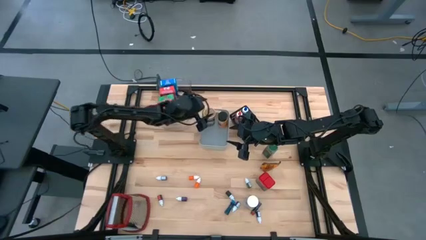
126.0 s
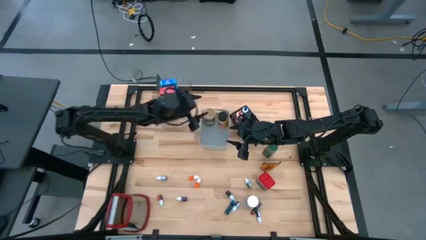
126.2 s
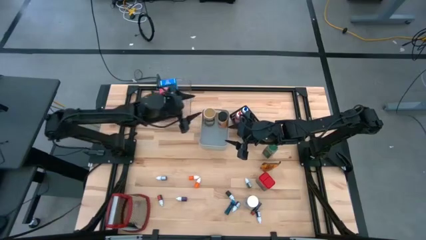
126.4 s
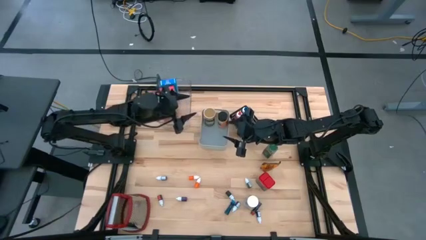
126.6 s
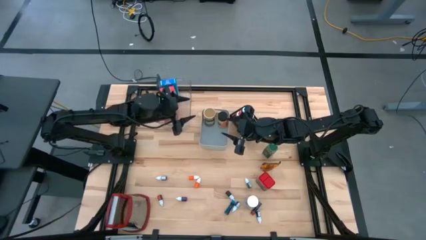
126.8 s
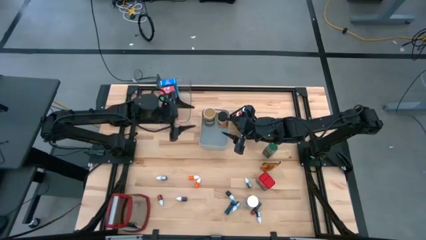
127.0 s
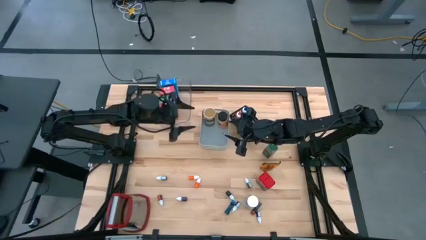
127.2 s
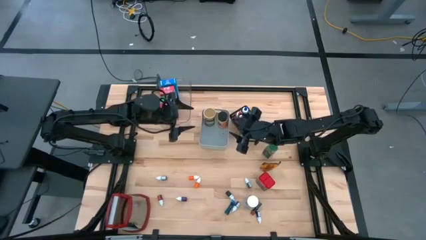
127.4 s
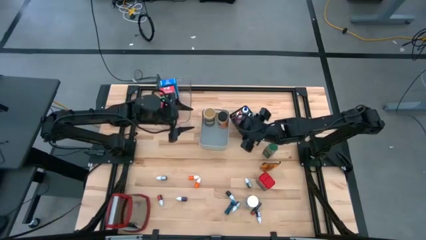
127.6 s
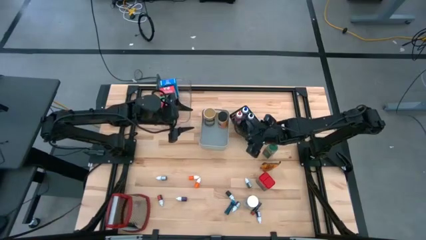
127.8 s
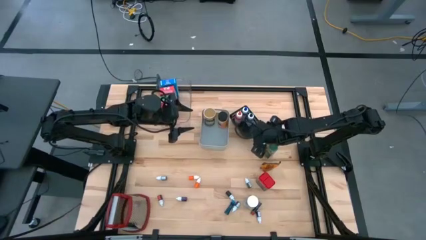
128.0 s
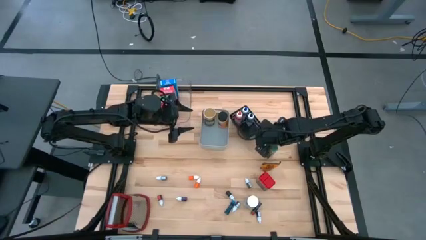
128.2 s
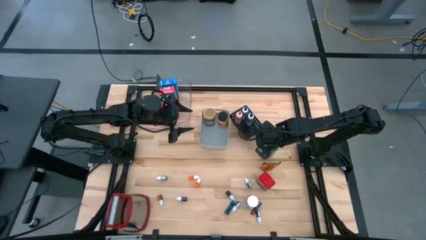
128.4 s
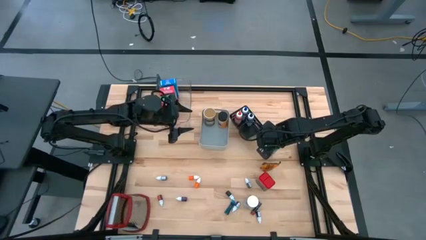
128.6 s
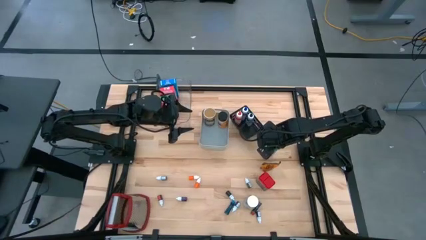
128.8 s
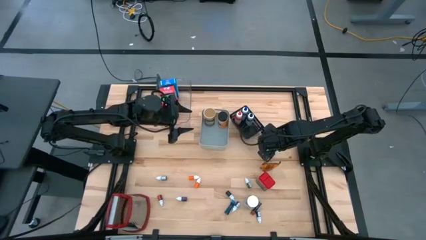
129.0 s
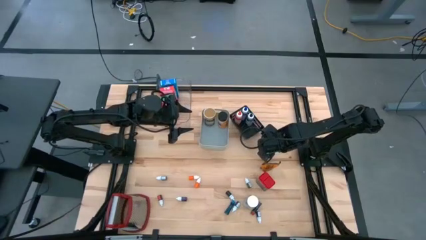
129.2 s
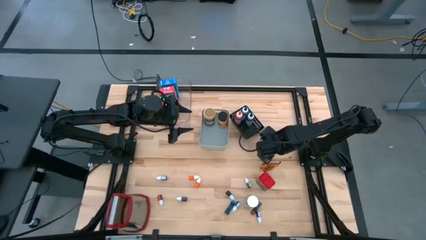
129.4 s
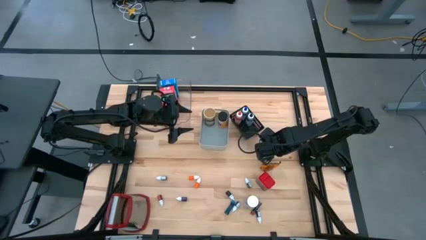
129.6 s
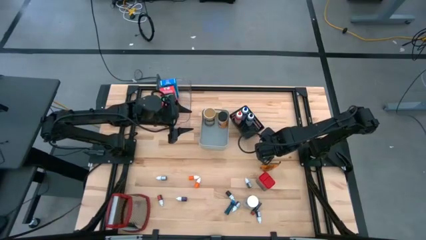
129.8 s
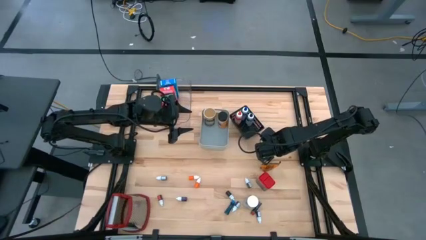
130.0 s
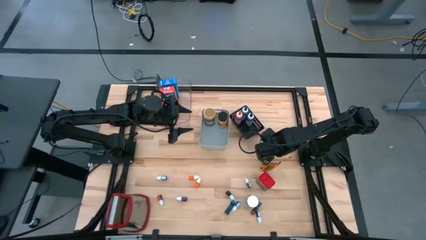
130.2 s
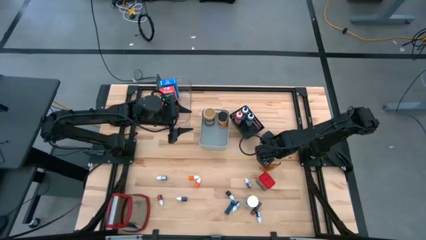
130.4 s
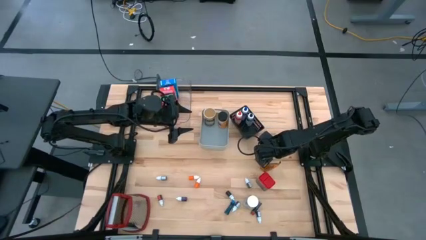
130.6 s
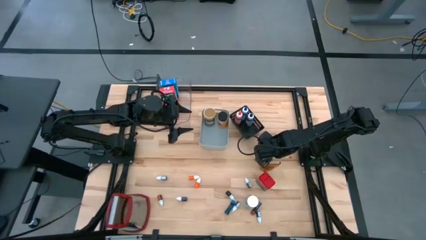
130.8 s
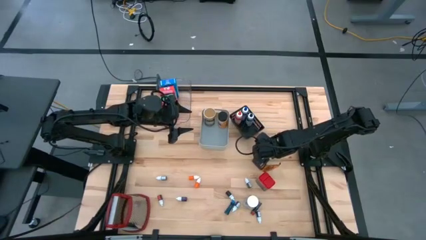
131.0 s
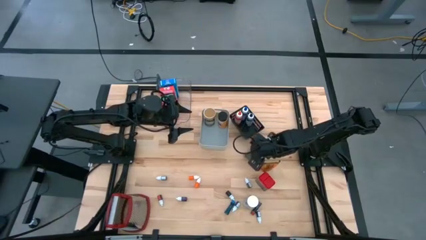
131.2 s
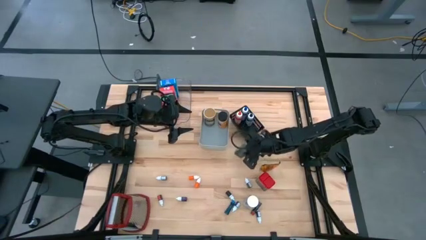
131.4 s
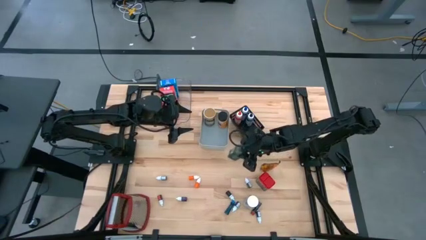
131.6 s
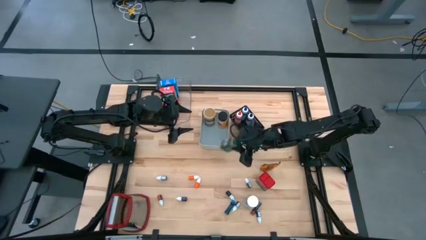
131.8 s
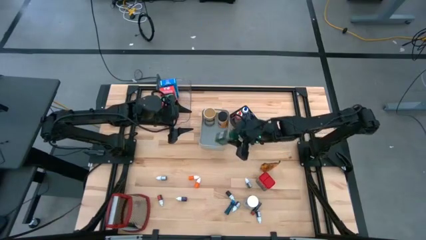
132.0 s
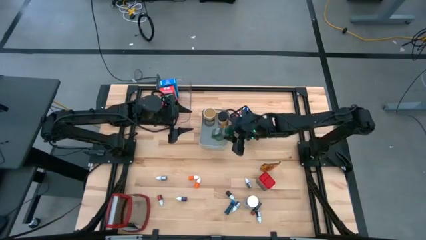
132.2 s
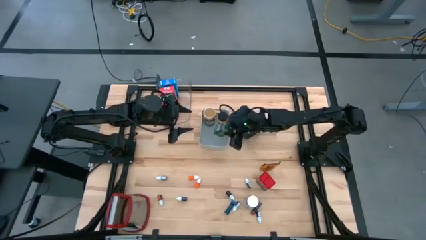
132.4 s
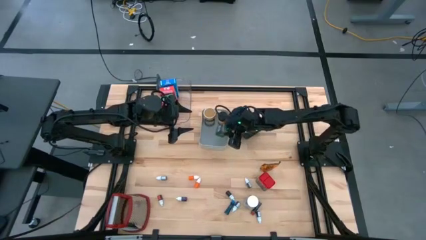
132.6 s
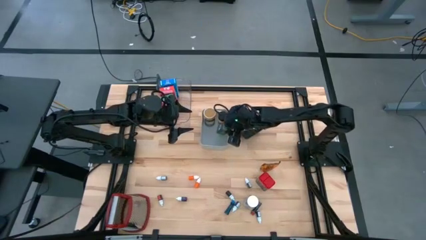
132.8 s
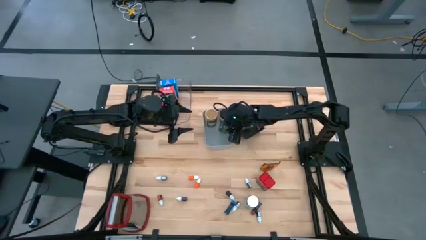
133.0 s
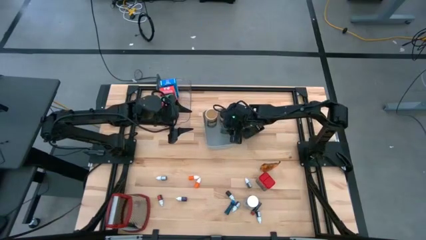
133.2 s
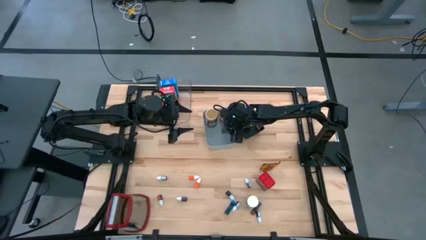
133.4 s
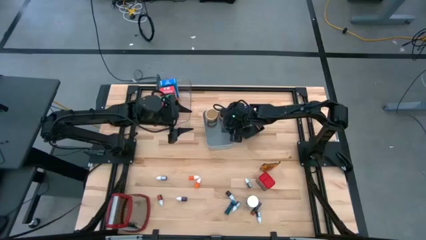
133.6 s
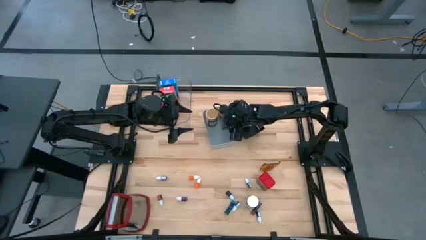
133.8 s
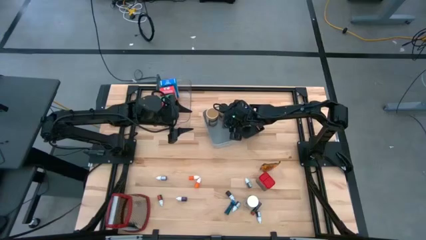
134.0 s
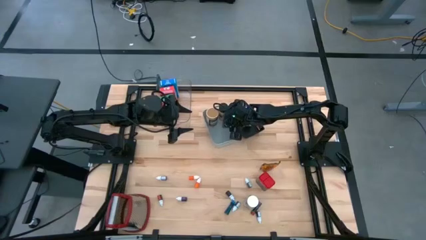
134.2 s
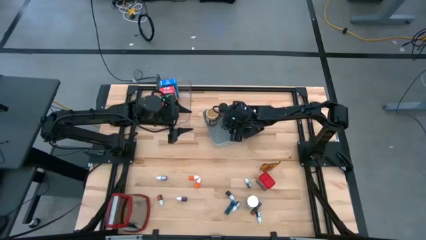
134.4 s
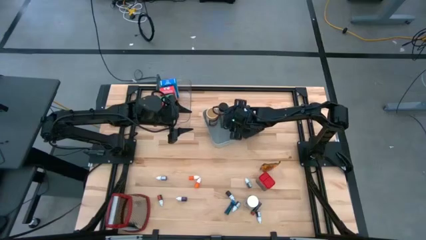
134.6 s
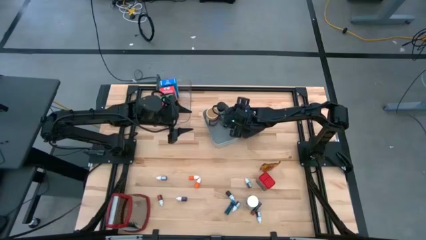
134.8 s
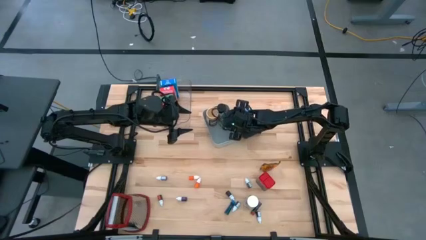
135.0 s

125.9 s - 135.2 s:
Task: Pick & Place Kitchen Items
Put the green seasoning bottle into the gray bin

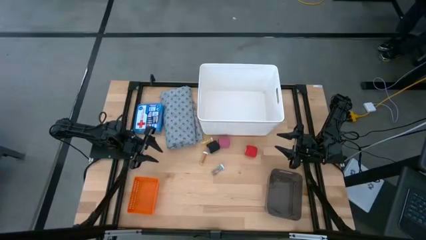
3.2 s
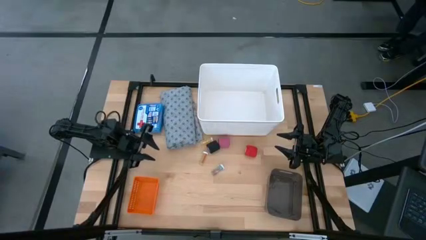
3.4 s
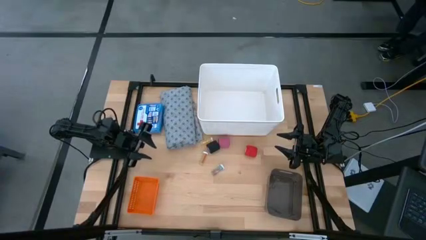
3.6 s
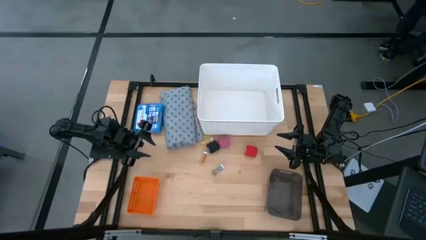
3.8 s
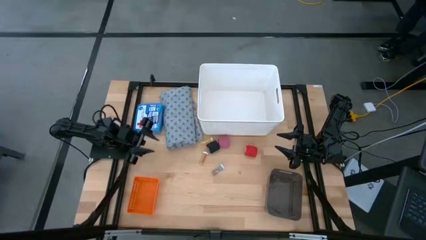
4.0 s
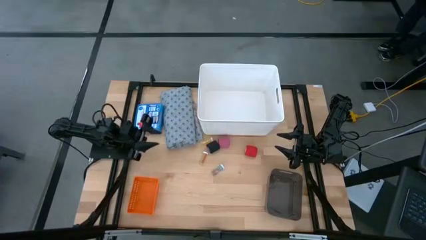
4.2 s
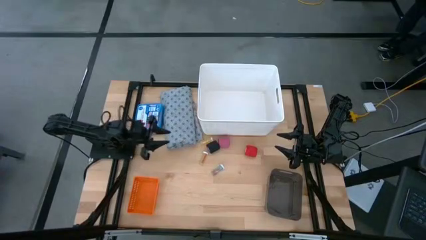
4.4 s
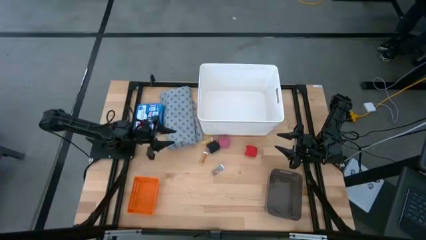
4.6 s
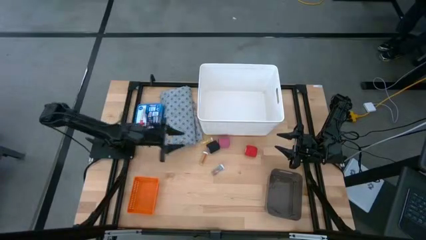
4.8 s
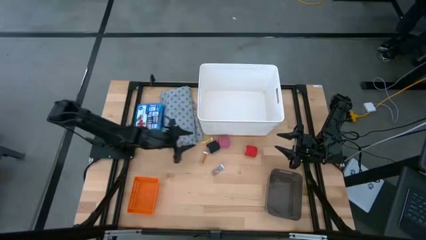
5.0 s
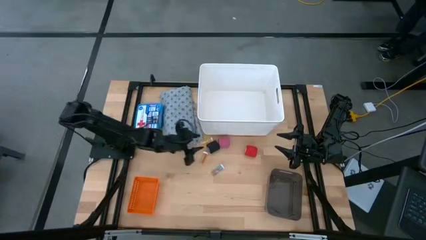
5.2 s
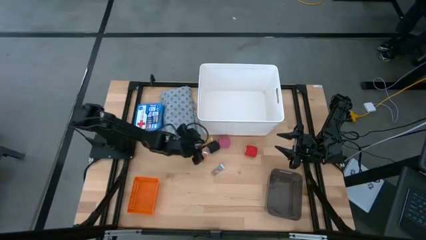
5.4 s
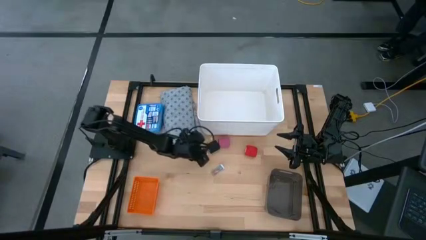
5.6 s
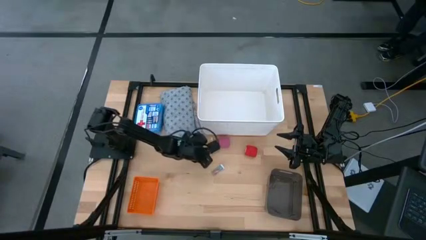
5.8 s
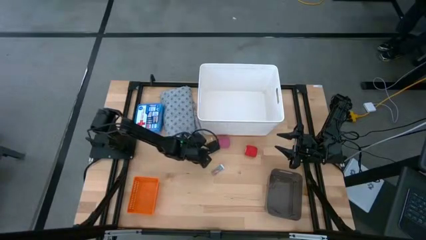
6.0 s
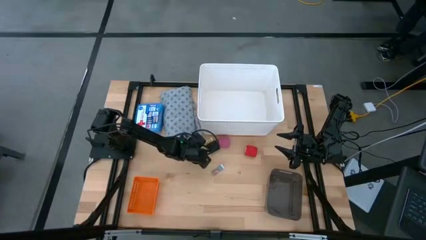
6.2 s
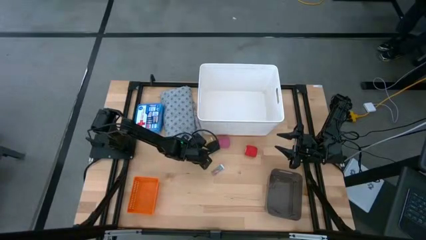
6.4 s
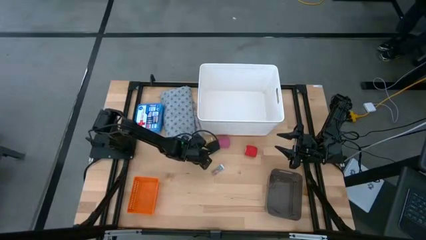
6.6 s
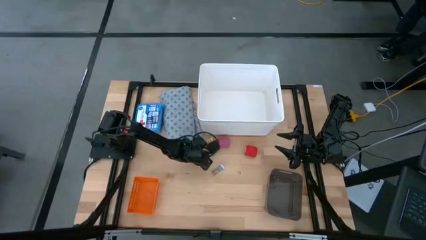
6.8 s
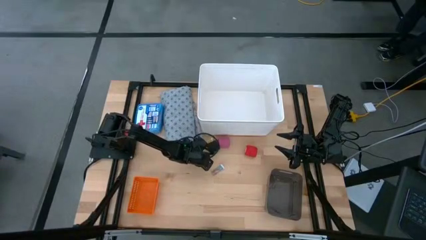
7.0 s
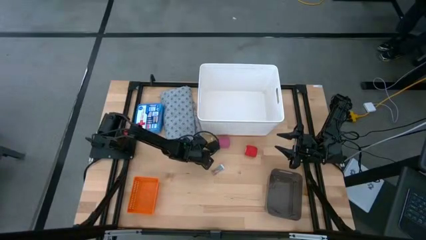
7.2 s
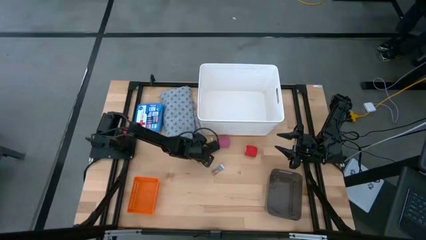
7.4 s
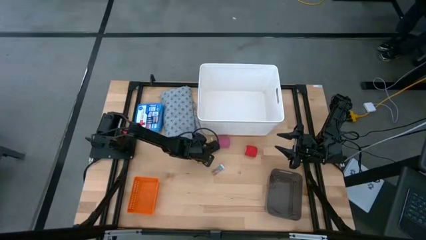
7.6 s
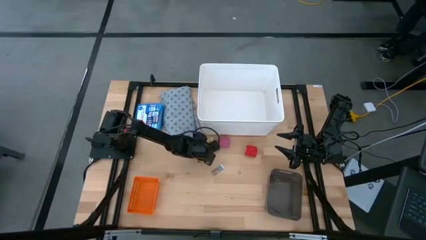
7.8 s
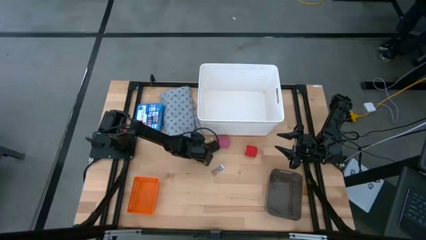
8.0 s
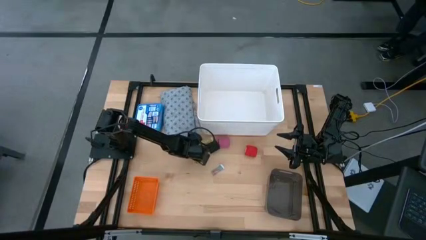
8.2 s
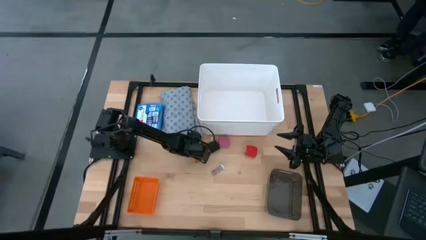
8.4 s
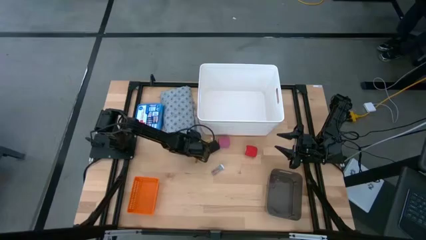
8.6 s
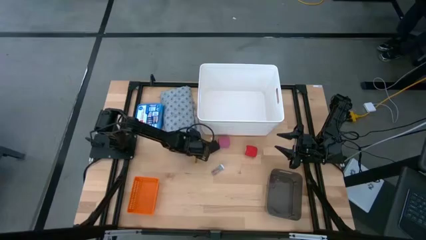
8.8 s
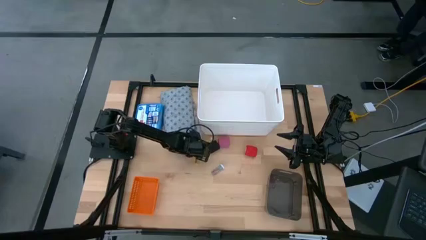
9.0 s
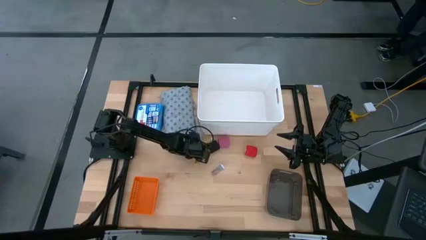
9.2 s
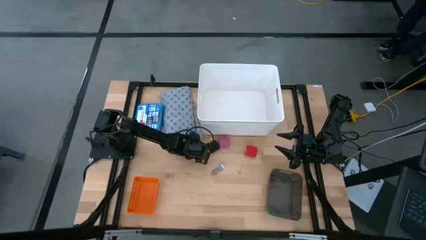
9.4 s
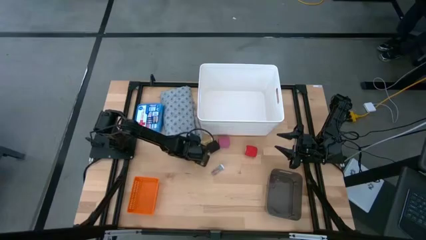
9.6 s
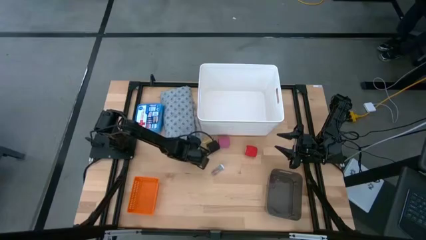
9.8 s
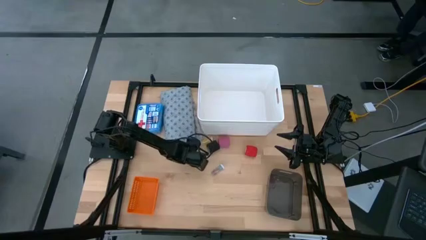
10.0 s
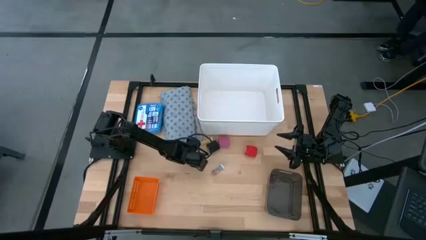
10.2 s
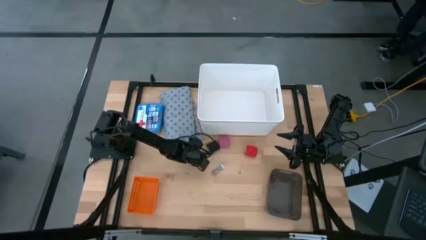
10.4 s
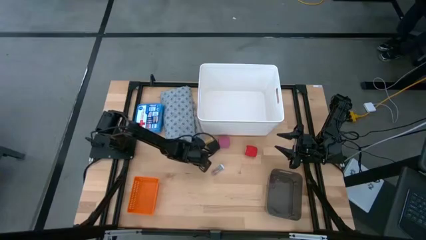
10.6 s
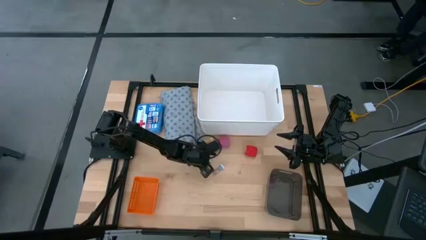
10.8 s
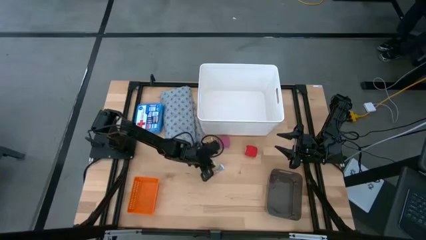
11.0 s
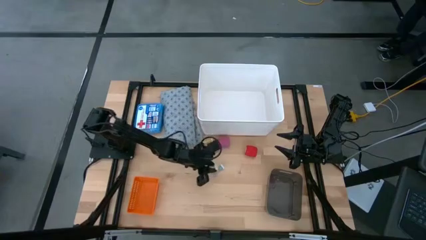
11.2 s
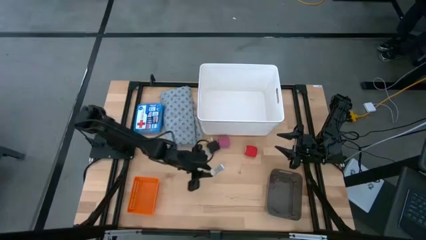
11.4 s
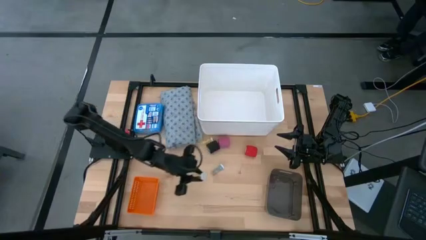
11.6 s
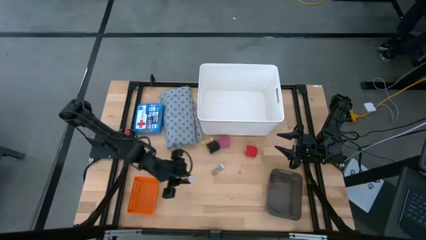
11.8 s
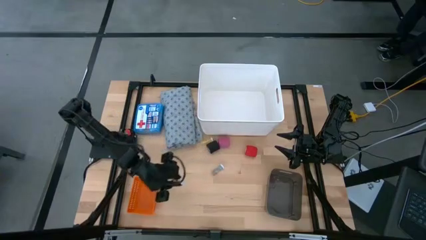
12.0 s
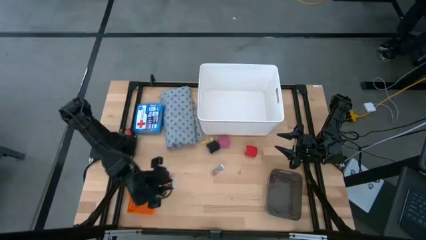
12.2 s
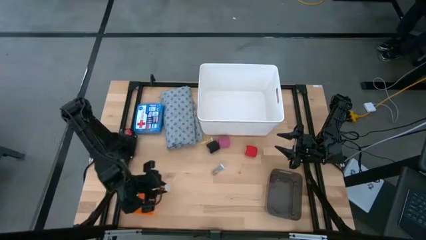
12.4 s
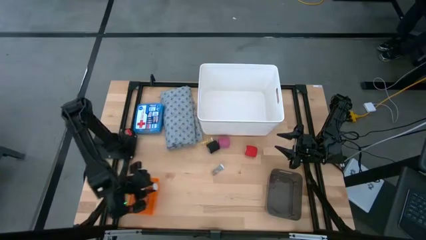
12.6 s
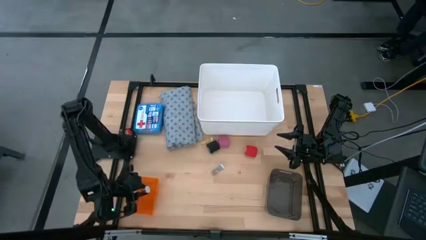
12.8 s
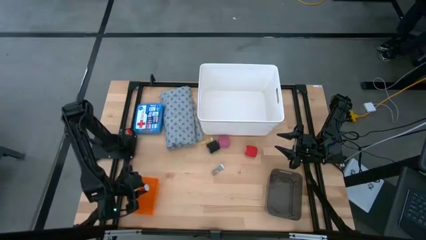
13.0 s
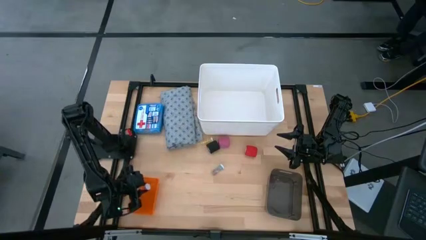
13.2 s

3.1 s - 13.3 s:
Task: Pick & Place Medicine items
Put the bottom yellow pill bottle into the orange bin
